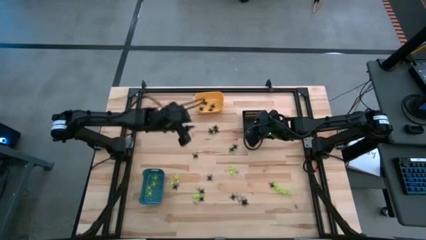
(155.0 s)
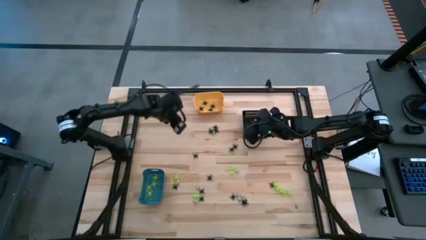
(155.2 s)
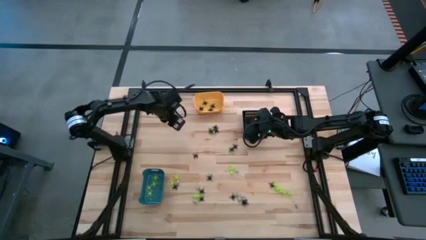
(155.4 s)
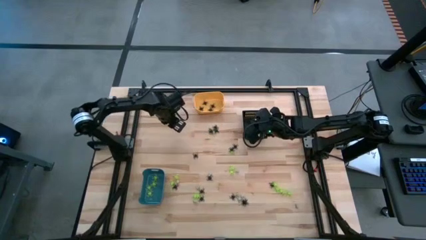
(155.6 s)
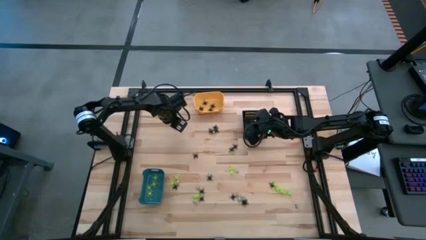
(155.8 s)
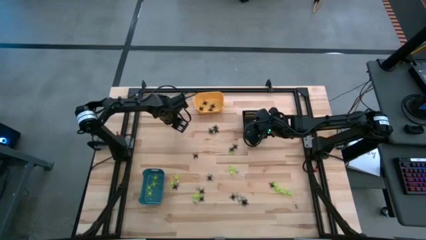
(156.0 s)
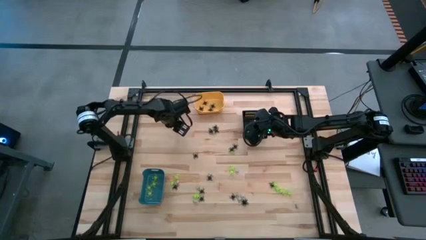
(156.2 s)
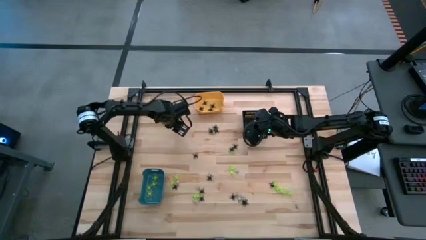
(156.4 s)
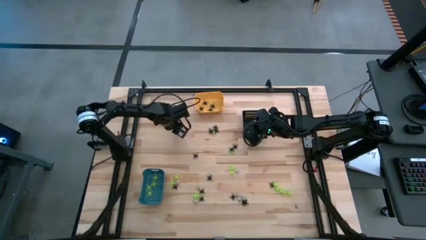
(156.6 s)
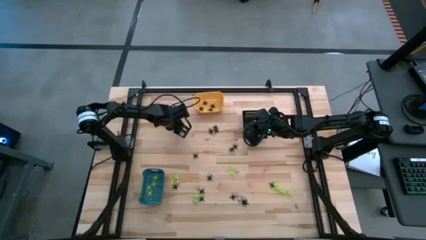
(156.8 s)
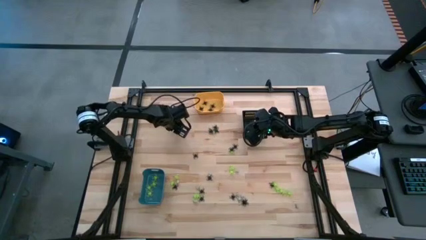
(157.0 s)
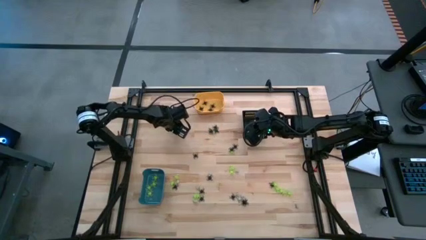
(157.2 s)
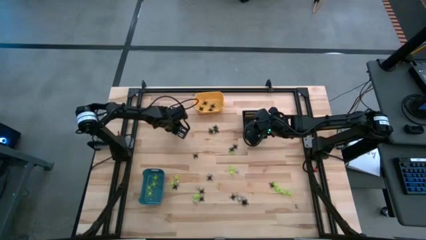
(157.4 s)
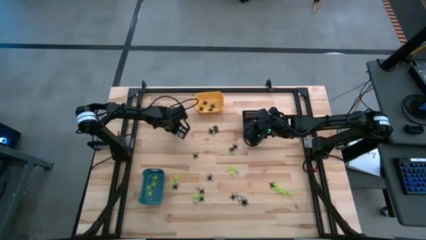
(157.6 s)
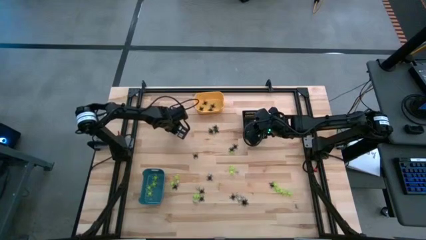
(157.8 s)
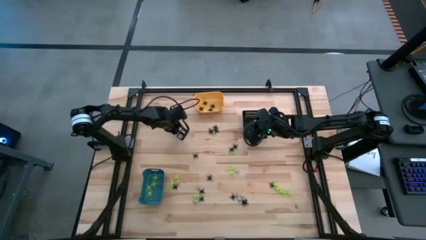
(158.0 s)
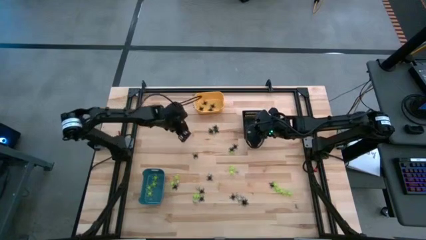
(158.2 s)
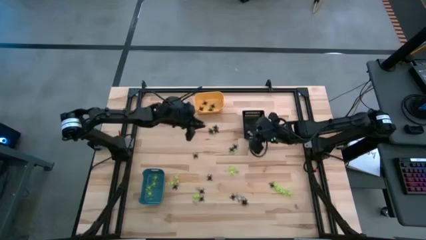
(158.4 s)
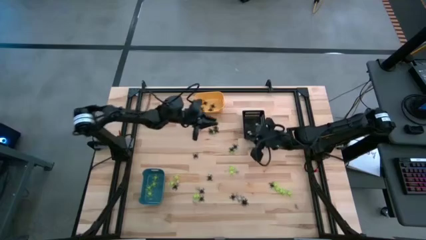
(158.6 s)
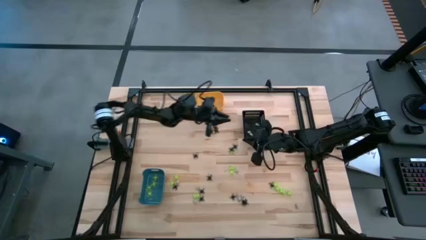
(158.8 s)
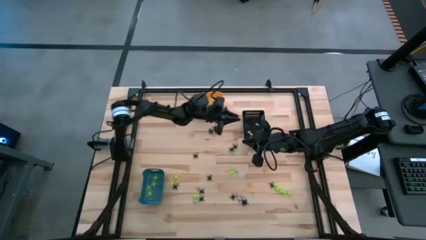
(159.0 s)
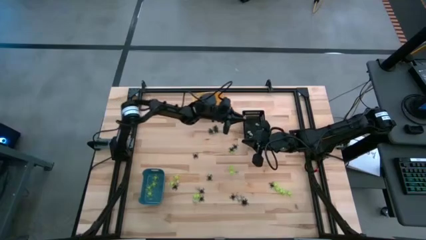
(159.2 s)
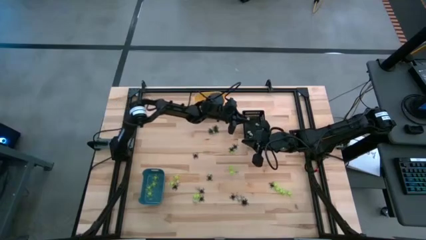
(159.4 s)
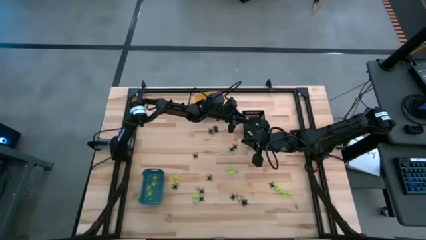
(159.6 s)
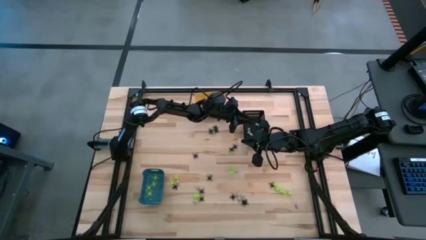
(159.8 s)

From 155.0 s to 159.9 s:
Task: Sort Halloween decoration
Put the white skull toy into the black bin

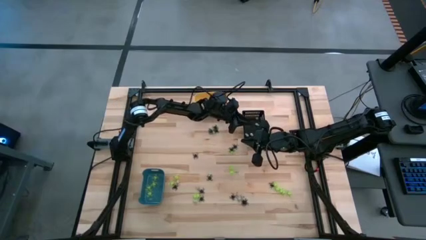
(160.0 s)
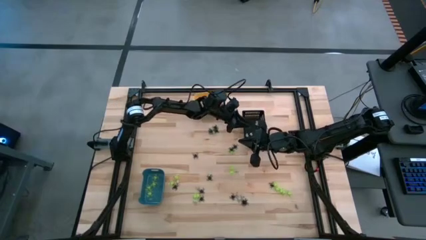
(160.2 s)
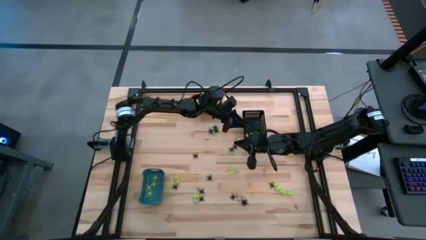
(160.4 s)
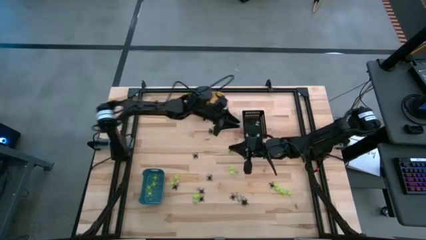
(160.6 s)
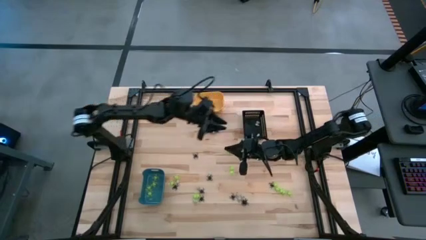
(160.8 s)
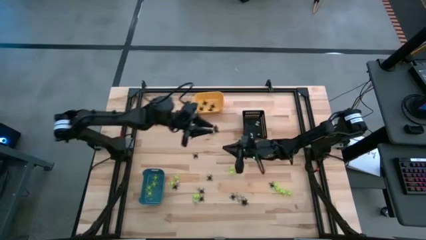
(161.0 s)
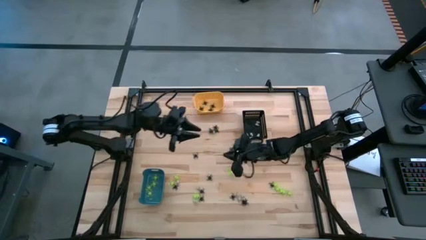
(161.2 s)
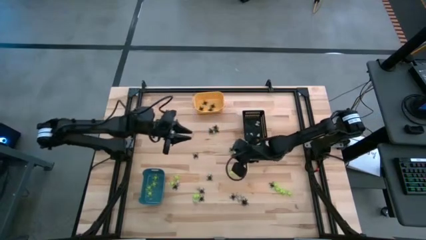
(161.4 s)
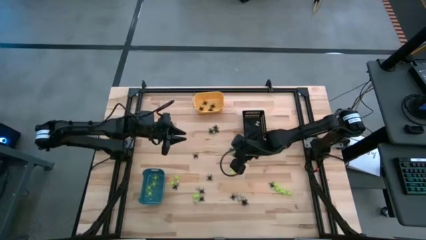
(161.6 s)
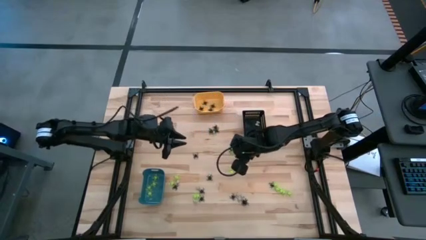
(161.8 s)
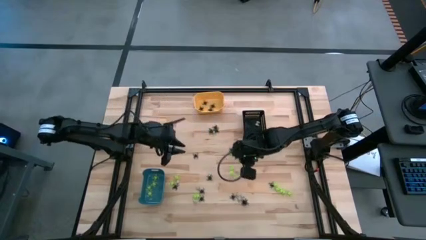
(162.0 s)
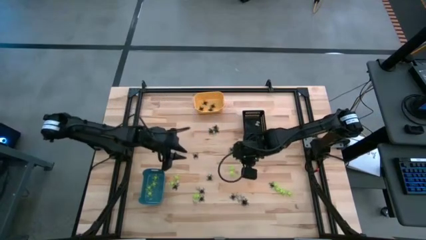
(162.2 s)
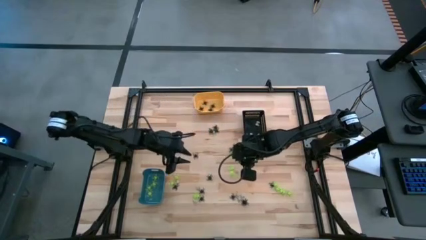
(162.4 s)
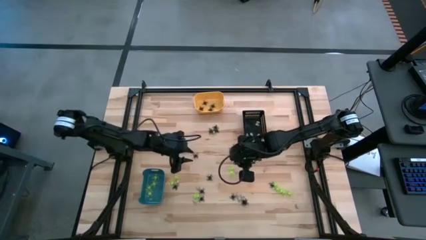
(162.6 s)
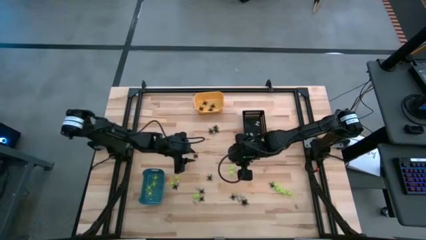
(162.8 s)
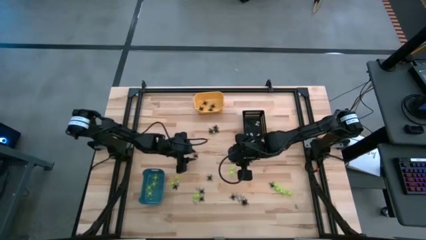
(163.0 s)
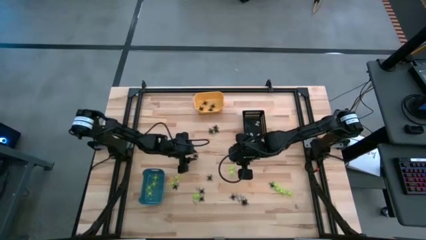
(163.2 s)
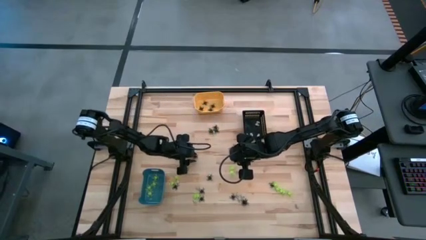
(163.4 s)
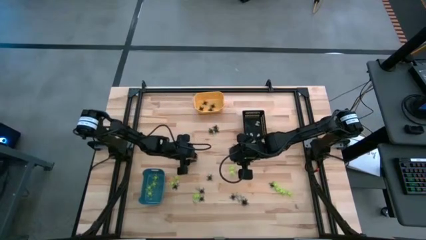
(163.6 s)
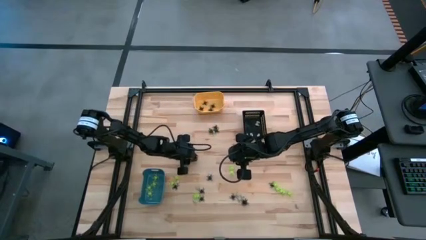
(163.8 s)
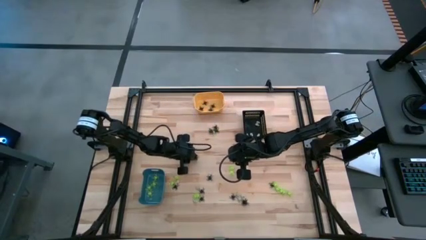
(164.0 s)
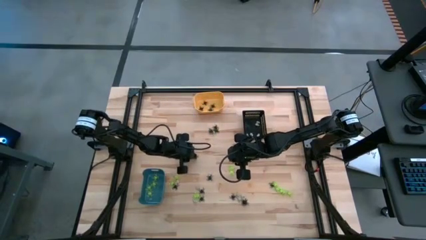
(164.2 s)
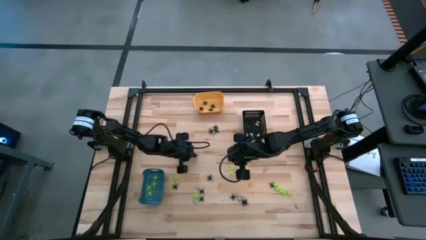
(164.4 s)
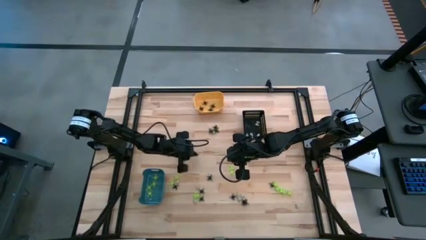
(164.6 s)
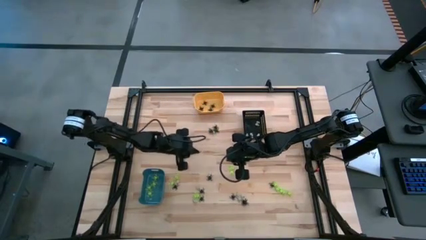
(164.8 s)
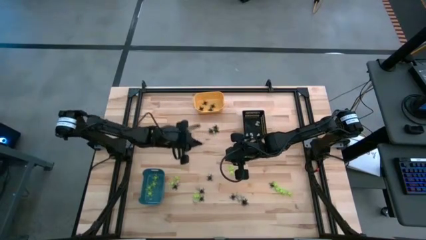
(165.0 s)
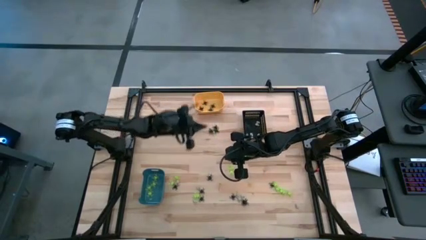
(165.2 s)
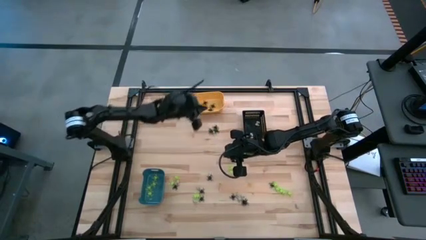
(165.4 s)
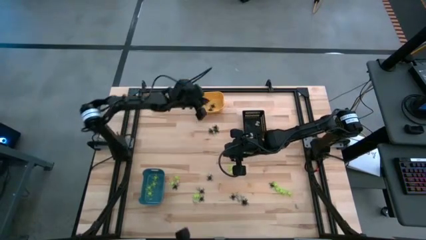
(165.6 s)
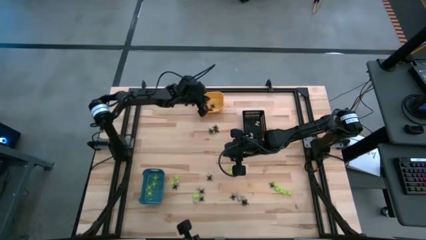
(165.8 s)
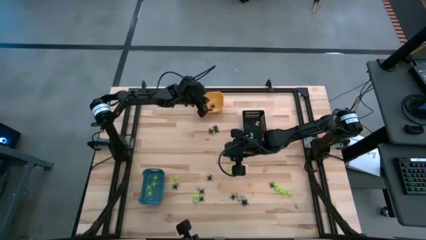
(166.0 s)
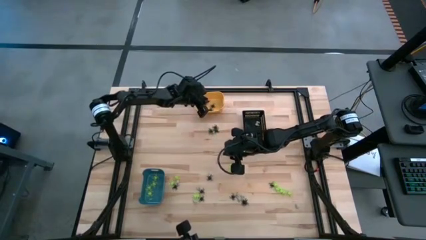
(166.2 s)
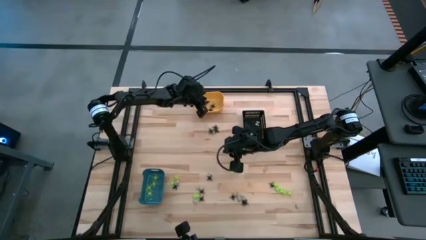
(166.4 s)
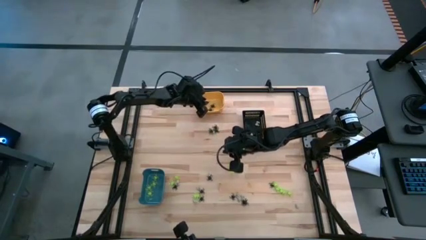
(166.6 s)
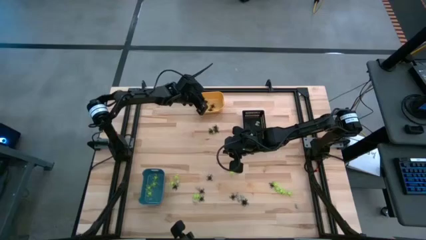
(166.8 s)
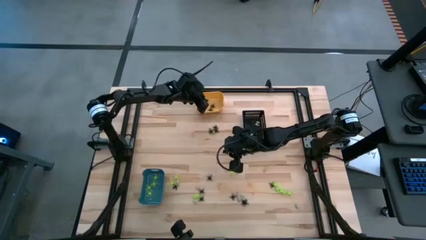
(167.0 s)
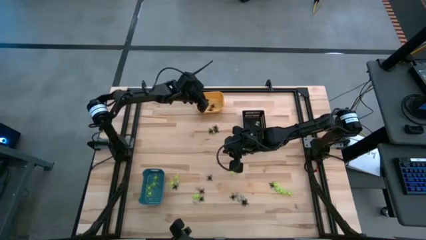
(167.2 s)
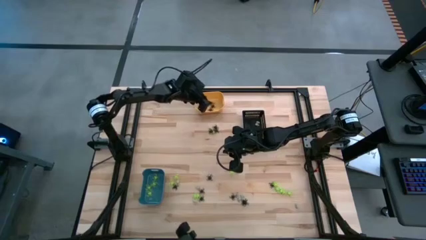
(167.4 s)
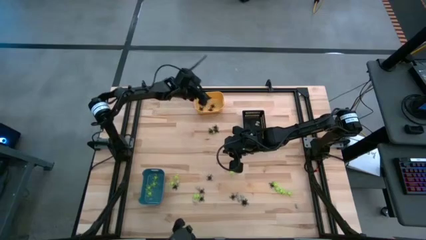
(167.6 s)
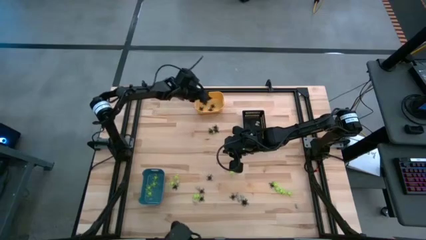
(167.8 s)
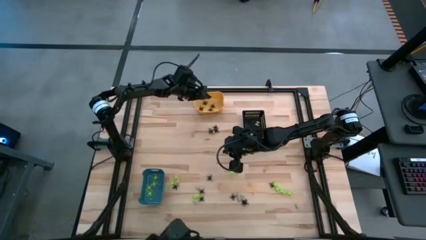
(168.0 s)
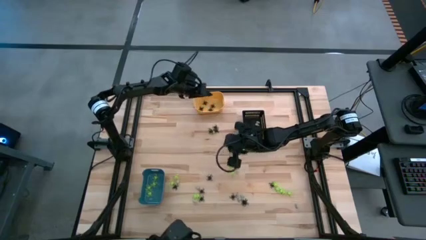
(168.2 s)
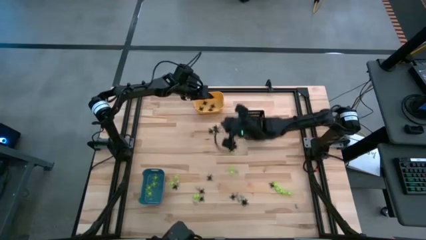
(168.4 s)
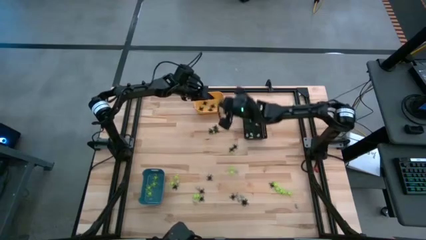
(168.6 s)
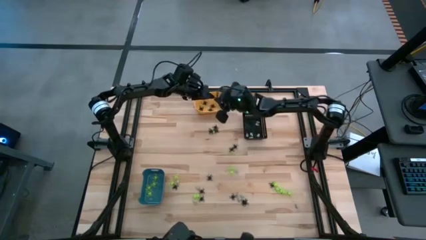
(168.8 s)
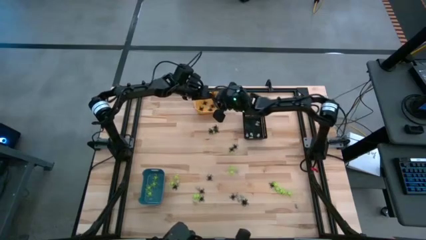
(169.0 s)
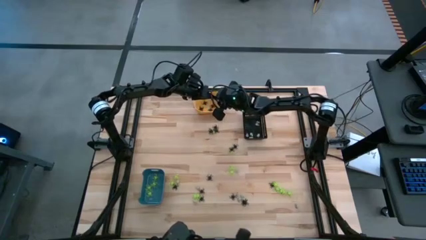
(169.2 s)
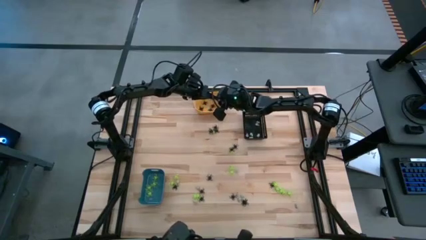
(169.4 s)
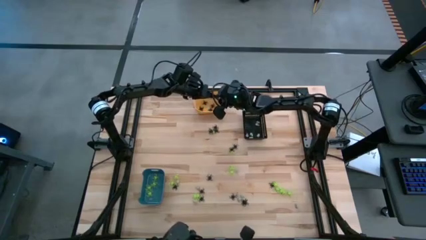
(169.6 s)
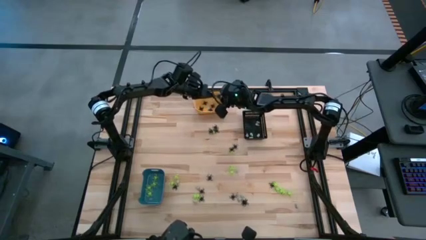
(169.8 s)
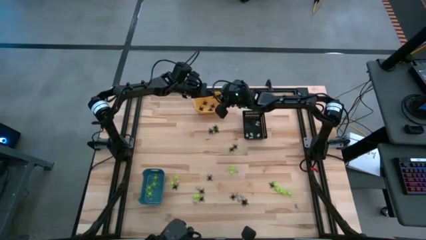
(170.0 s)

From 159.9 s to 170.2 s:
Put the black spider toy into the yellow bin
